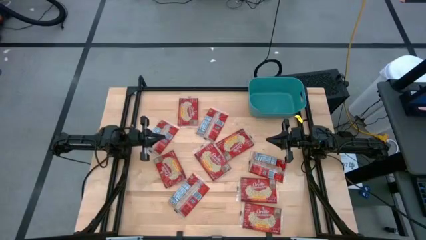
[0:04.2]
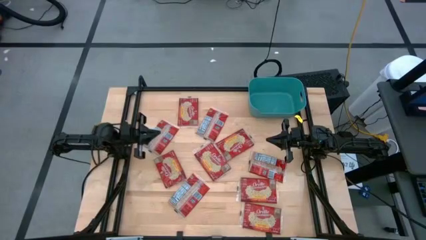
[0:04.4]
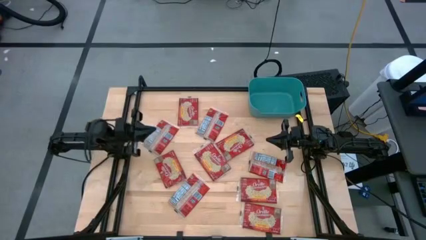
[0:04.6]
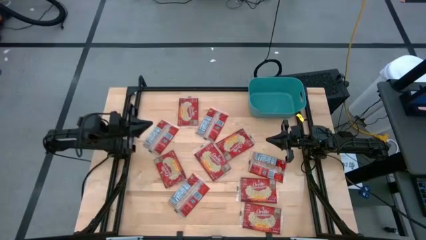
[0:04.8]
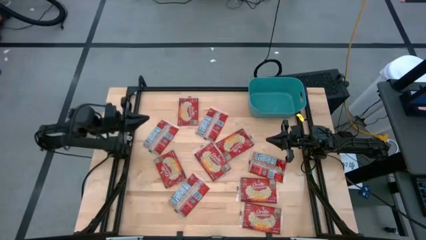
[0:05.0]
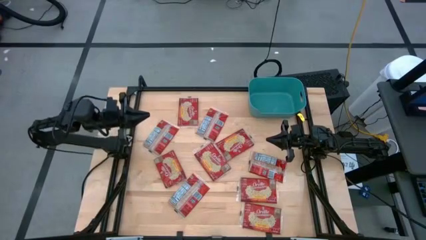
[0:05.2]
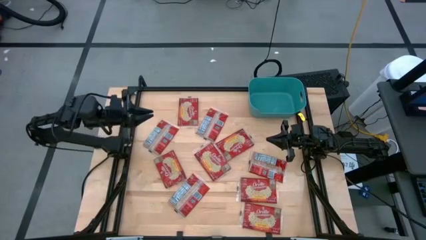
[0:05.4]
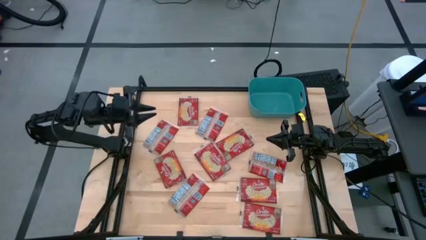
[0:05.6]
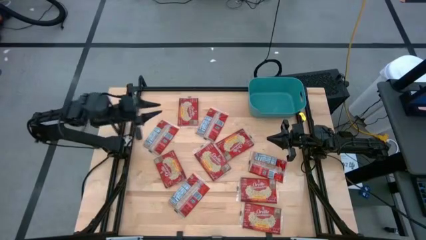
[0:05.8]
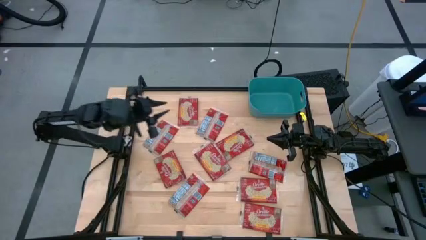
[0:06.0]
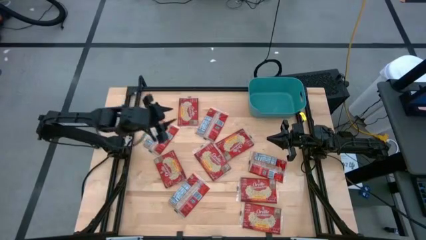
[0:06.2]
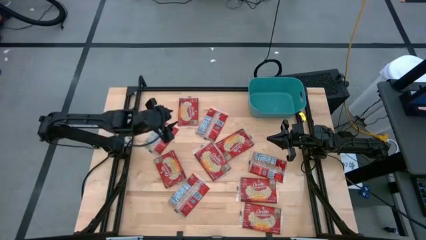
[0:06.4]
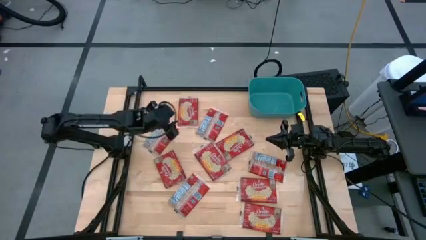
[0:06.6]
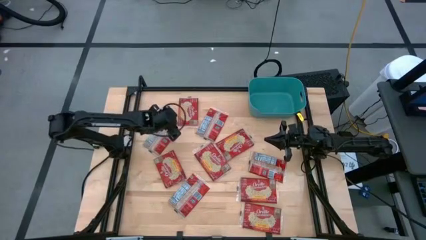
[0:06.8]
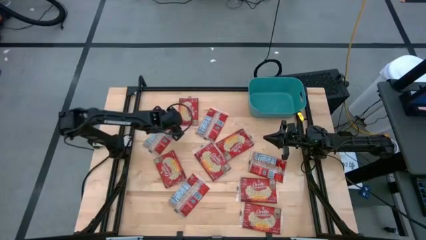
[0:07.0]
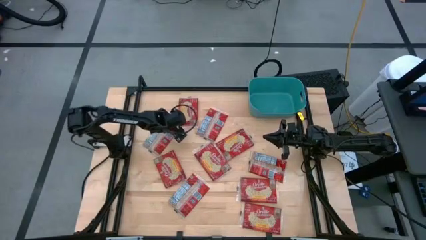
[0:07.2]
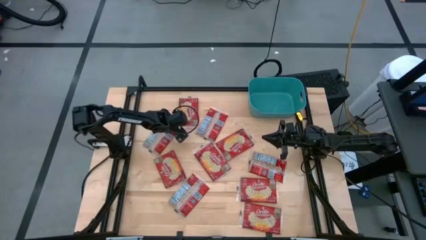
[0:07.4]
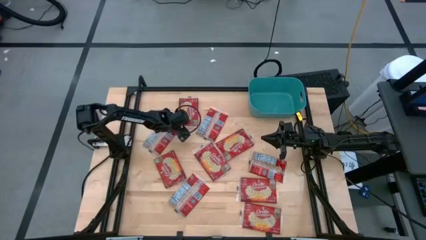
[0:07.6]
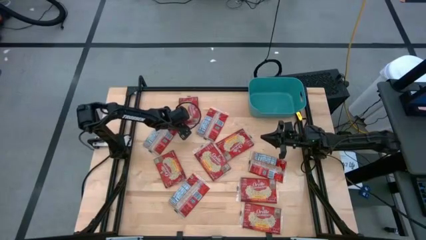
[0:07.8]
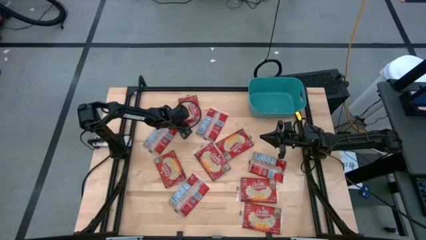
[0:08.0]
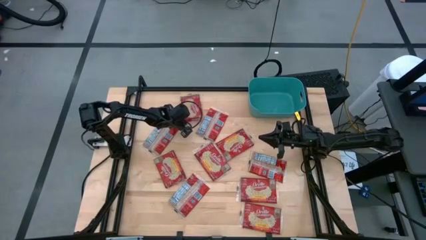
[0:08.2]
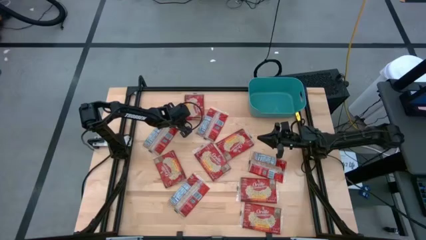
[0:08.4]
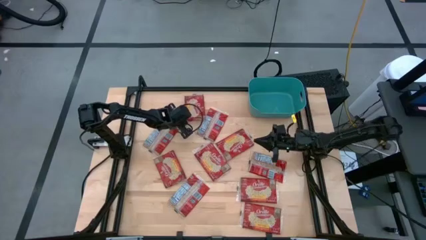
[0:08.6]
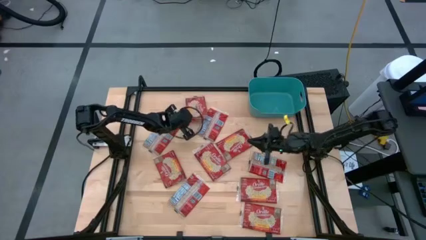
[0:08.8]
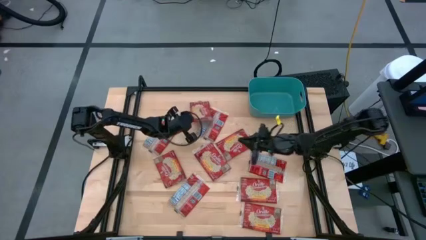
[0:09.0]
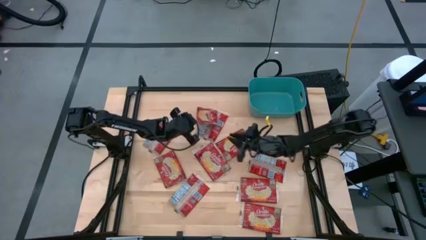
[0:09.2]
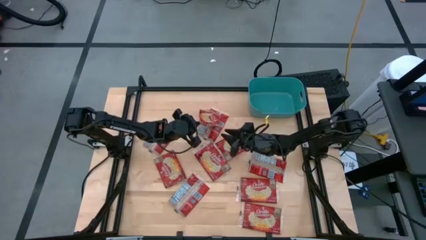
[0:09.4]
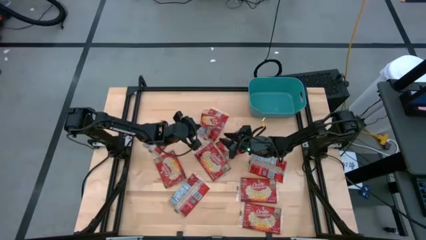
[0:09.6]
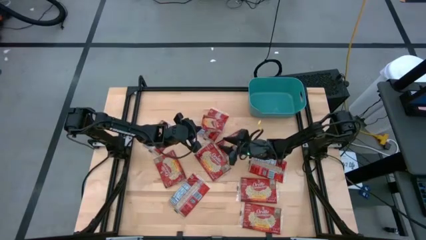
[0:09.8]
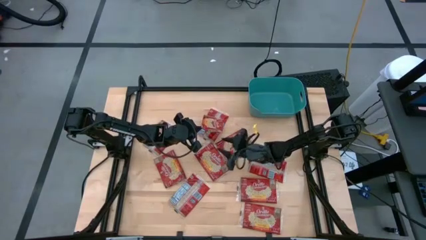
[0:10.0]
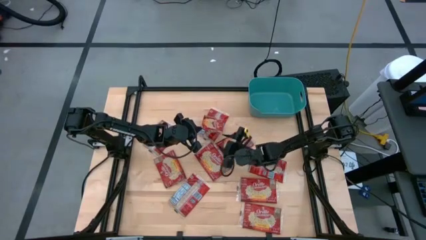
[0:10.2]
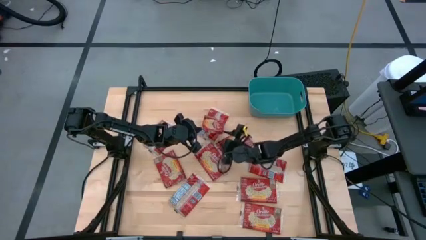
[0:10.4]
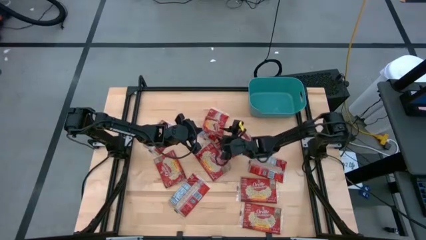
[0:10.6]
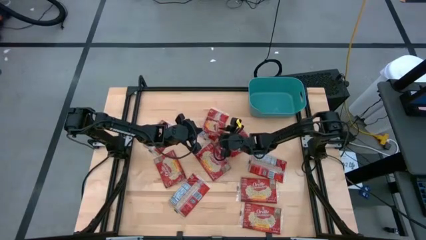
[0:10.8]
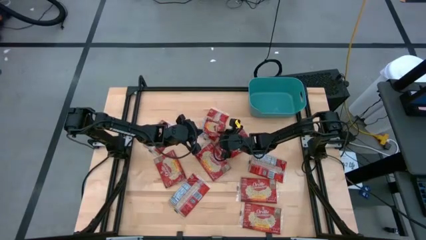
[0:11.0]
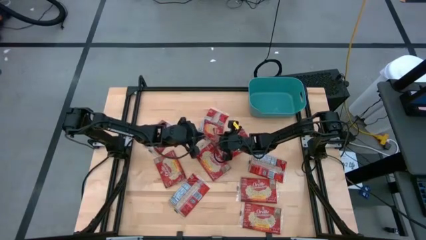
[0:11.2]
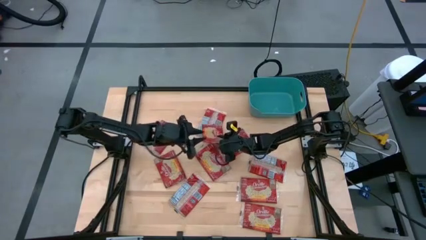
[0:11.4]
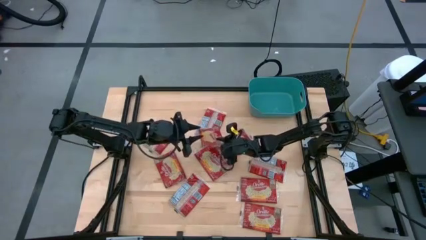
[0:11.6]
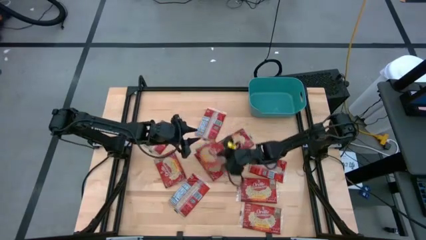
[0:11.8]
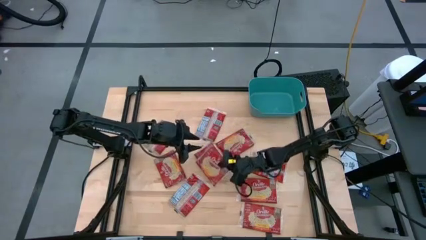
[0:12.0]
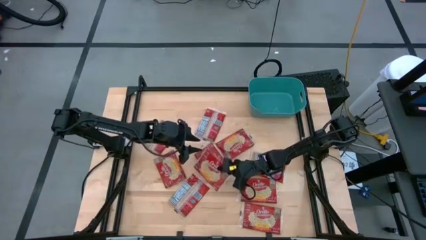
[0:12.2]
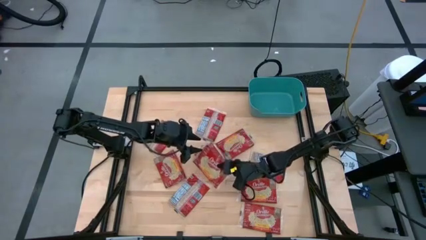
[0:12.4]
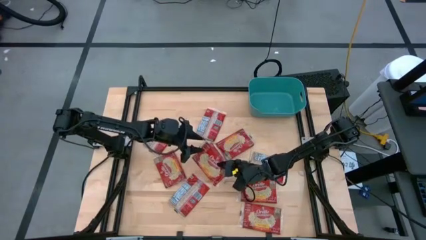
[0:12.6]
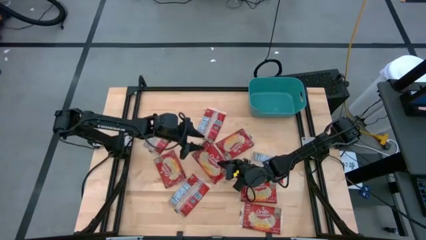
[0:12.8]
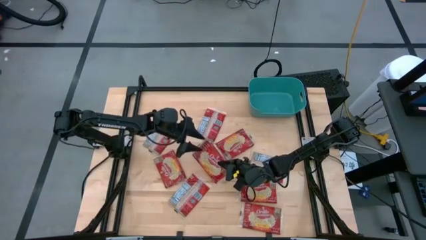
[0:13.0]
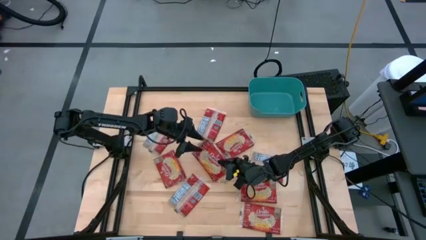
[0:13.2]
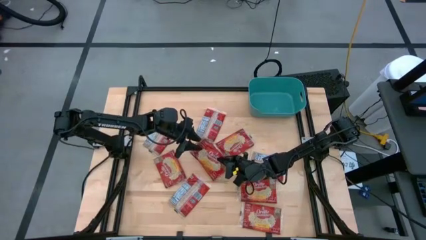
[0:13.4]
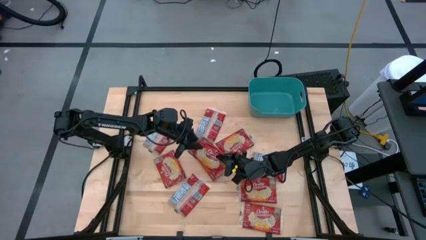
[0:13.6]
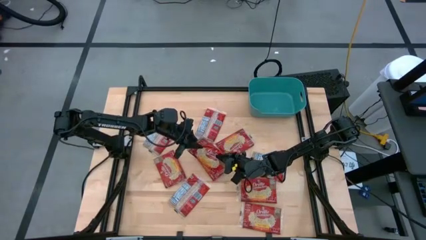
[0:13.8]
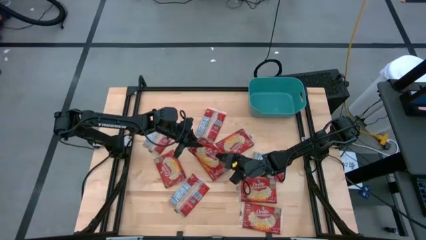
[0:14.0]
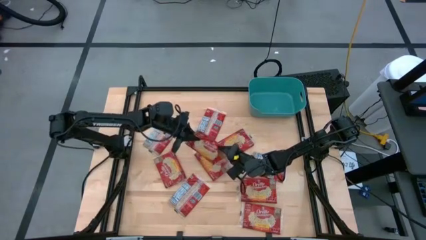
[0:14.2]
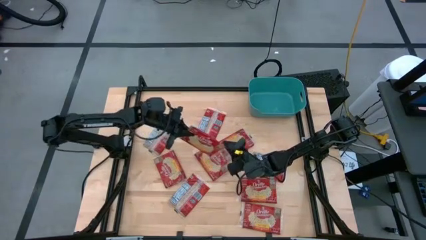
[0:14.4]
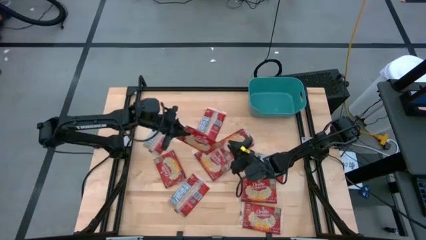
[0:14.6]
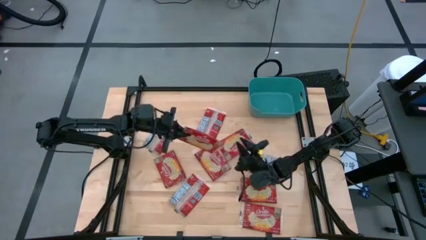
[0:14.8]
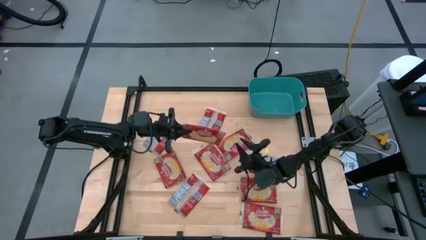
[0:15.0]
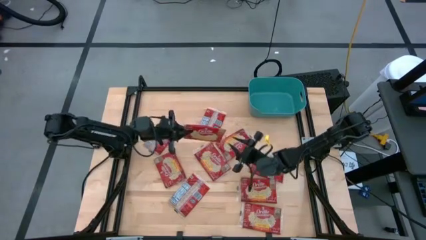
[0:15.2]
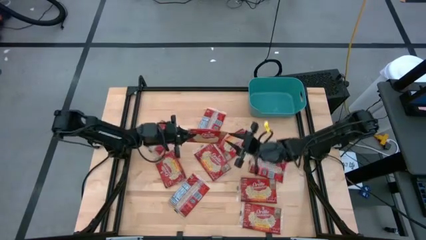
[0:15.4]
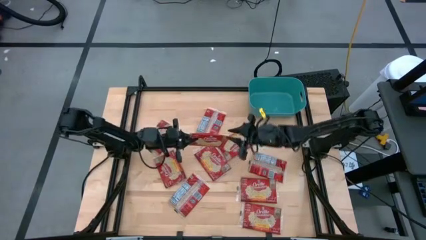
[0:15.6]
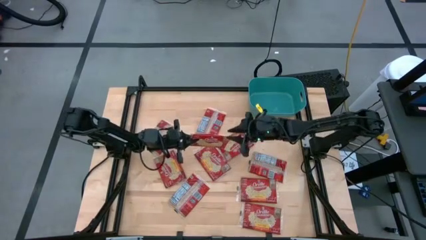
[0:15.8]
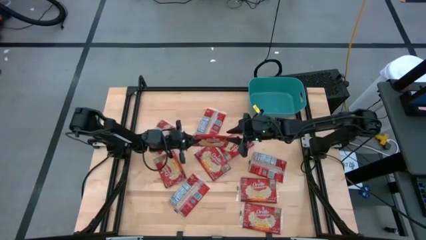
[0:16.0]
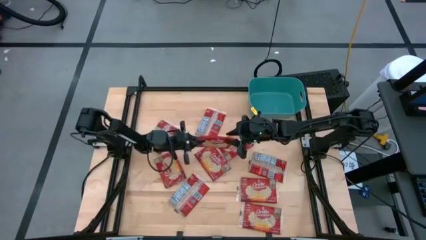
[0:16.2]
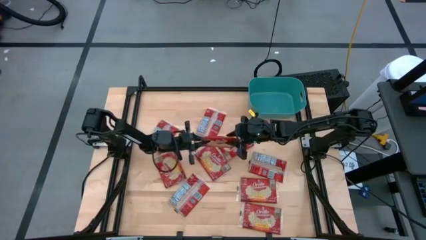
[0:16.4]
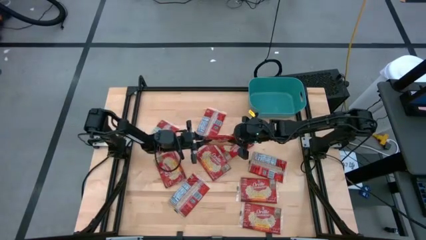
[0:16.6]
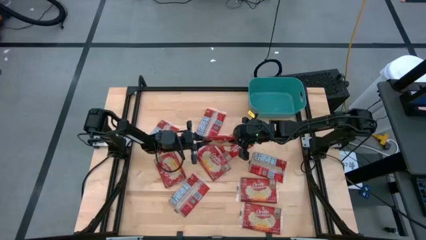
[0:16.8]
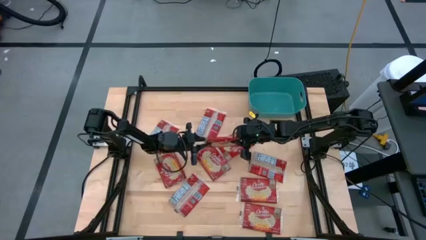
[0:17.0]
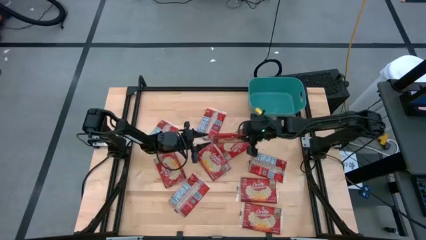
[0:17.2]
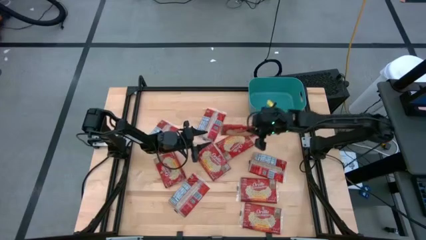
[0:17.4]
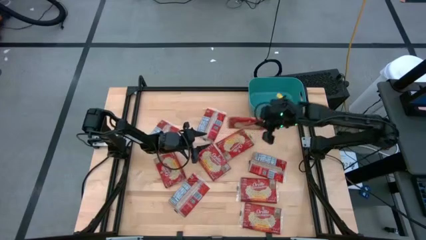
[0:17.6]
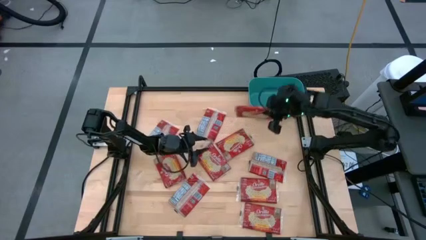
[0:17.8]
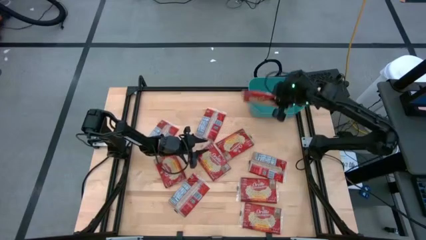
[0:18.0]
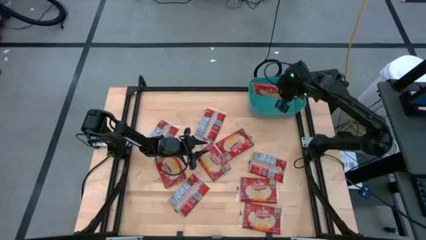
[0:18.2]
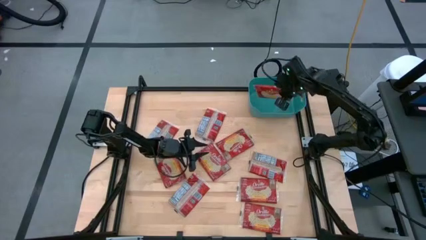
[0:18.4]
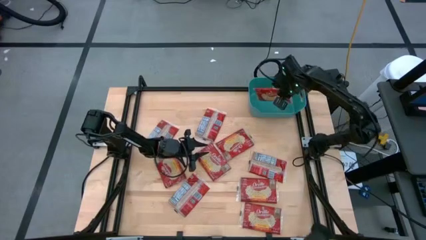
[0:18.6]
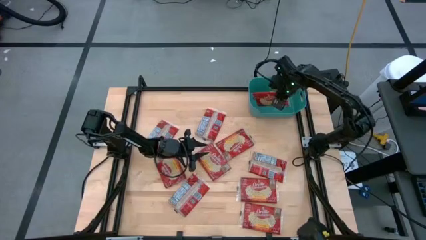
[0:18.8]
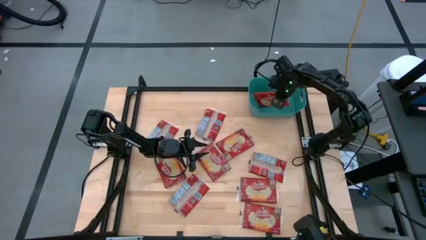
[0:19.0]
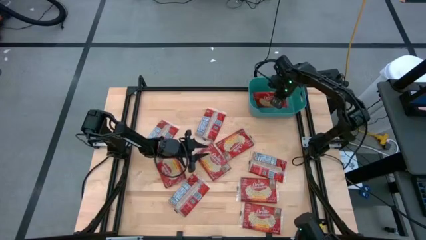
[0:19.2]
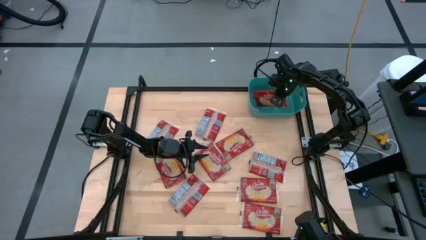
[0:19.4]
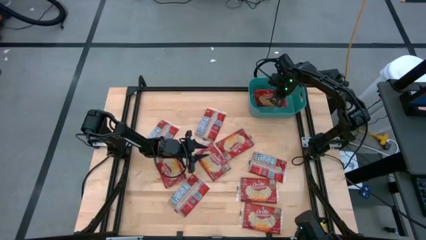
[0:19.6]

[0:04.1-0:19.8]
Task: Sort popcorn bags into baskets
Put the red popcorn bag into the blue bin
